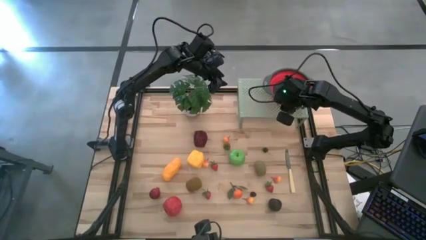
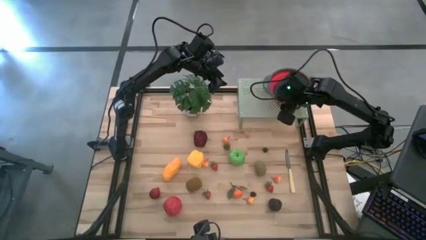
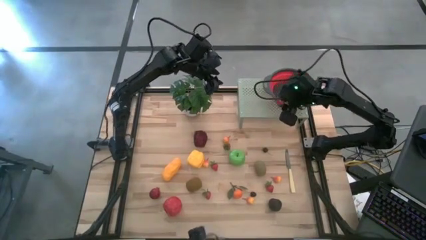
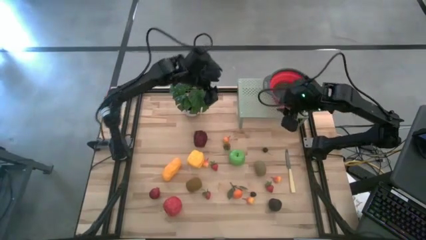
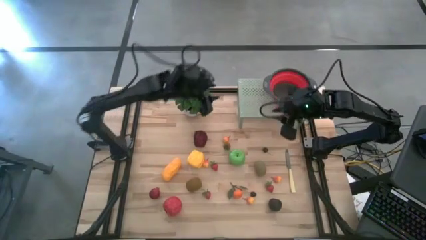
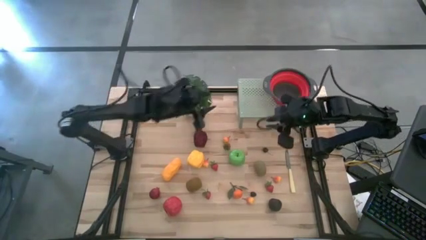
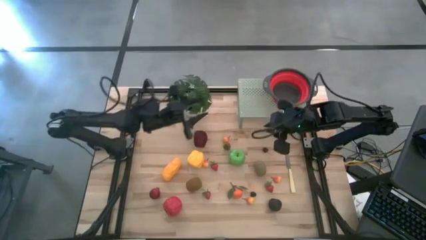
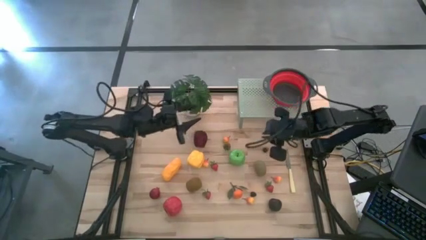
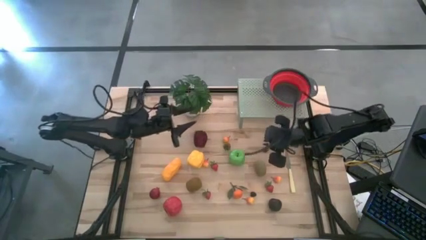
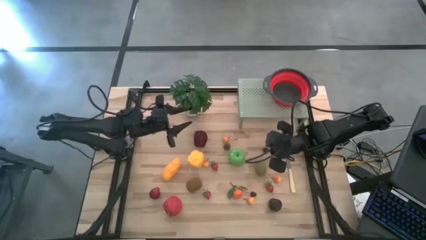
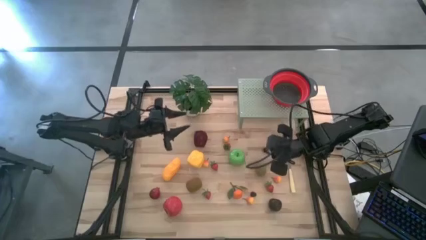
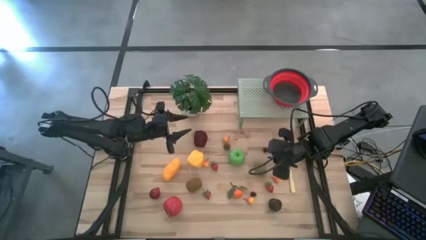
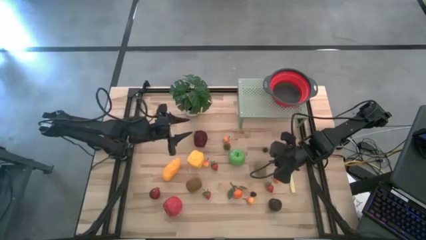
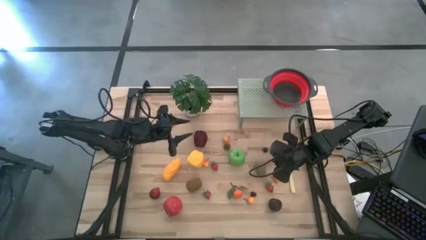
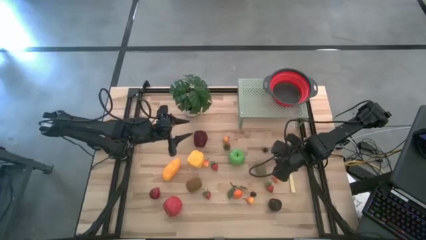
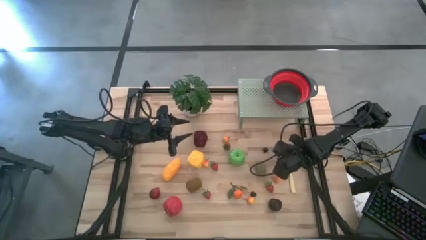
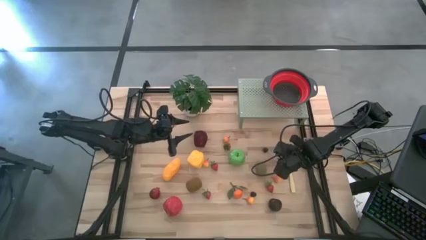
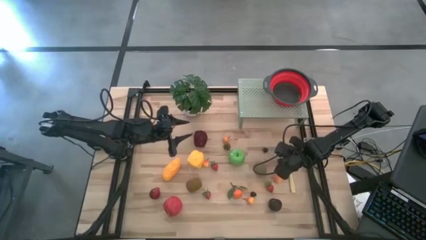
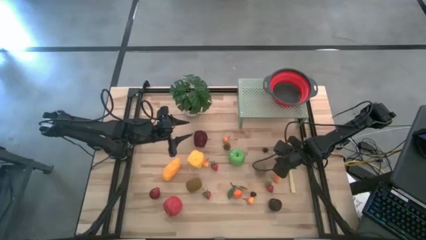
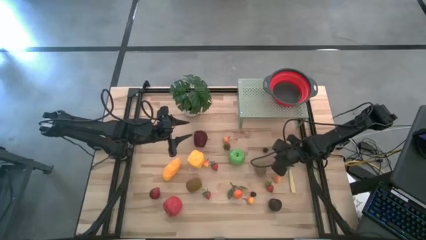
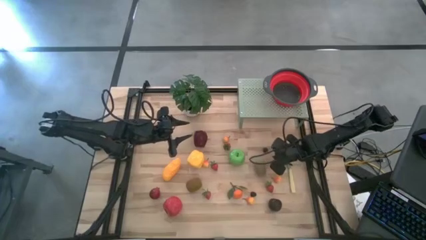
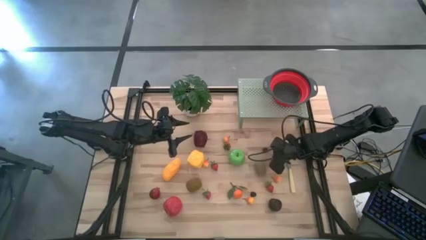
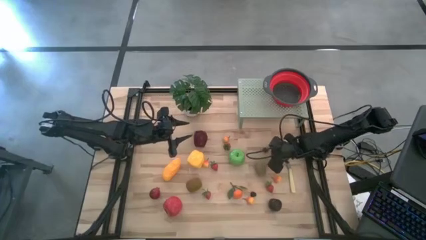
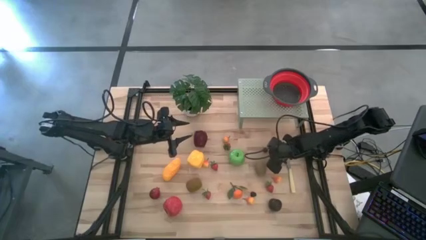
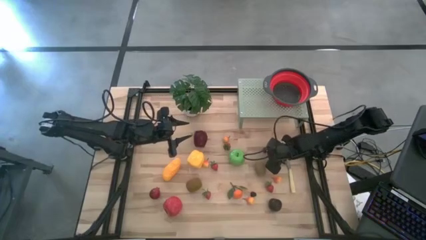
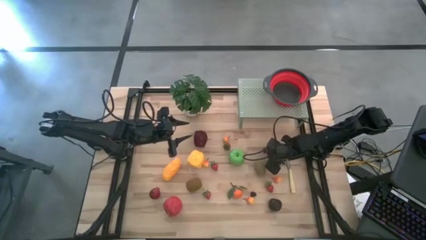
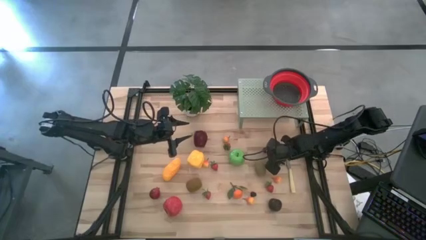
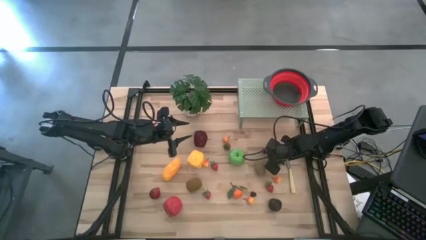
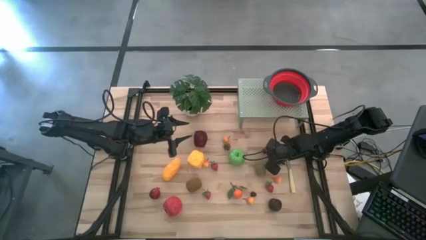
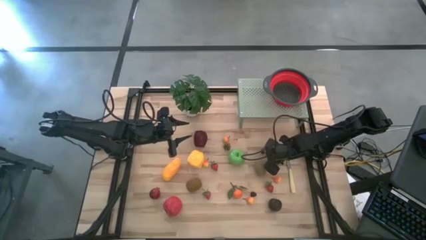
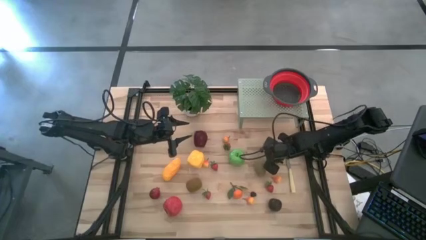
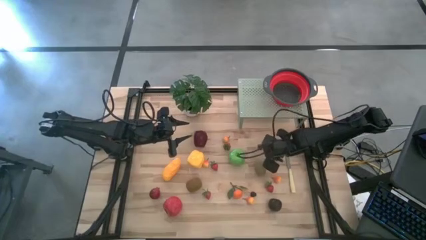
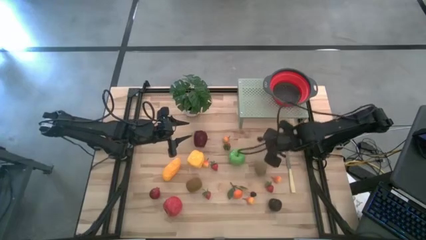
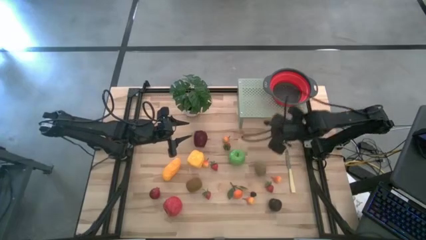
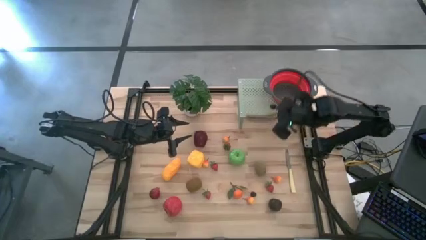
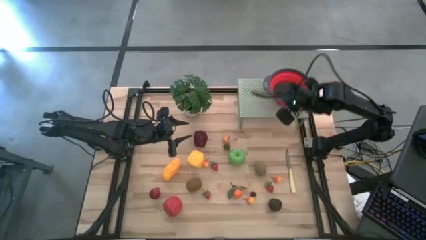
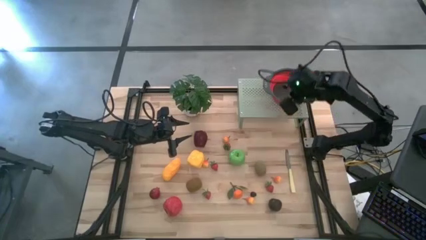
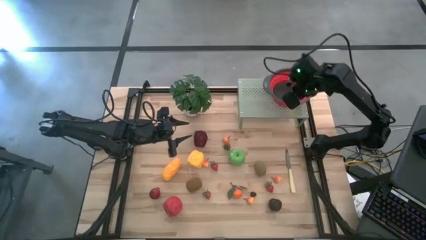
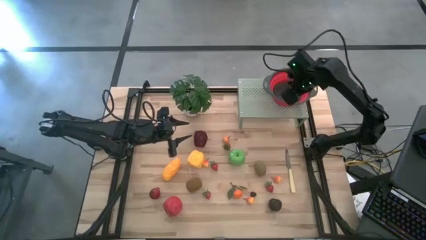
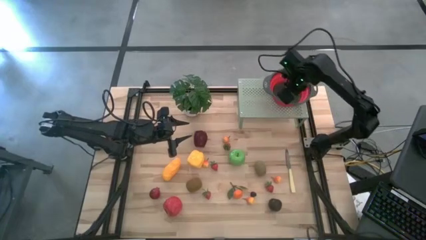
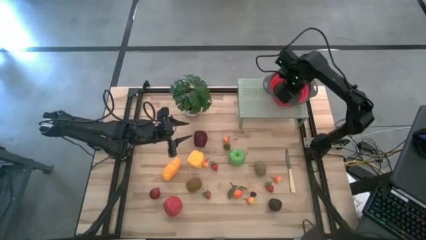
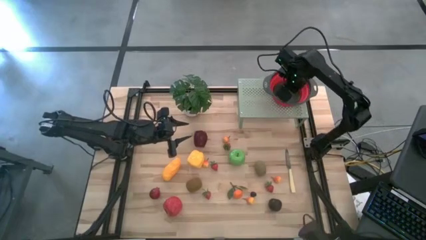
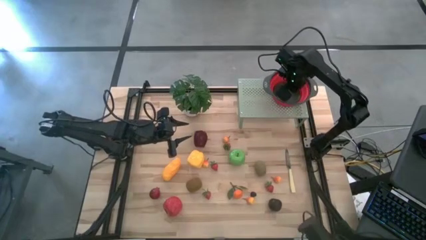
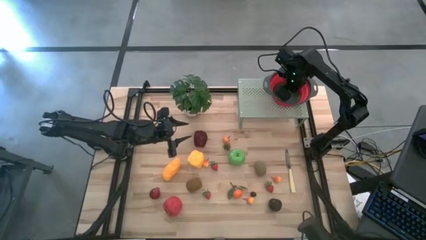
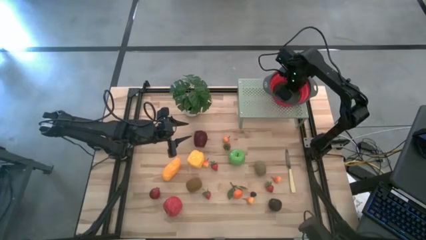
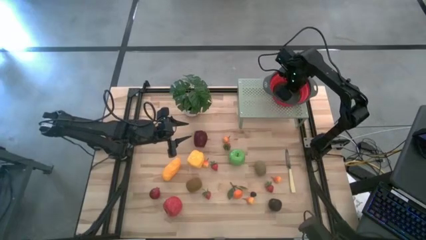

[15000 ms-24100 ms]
Task: Pick & Place Fruit
Put the red cherry into the red strainer bowl on the shelf

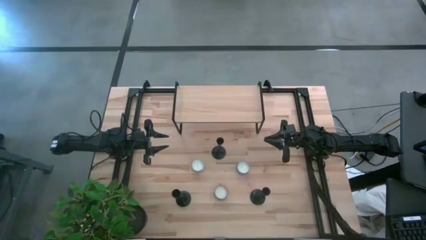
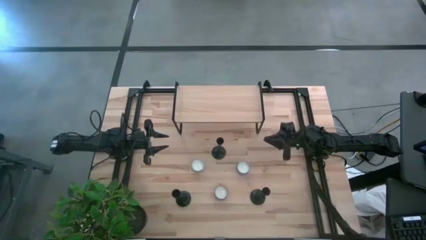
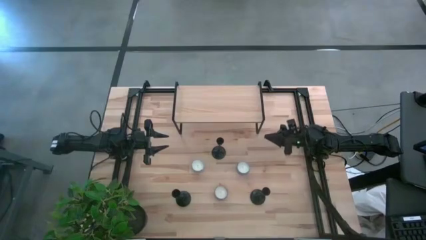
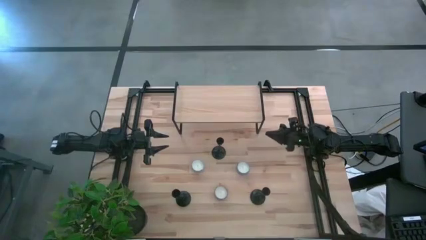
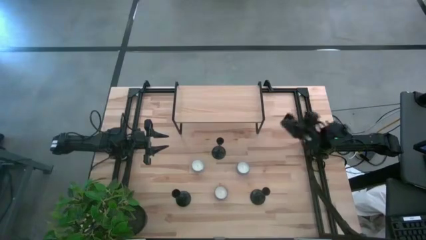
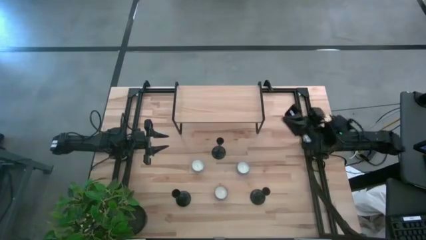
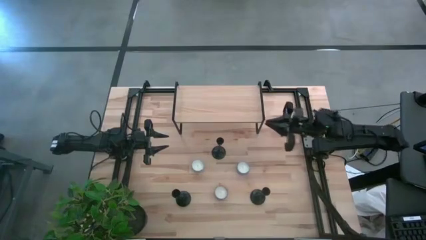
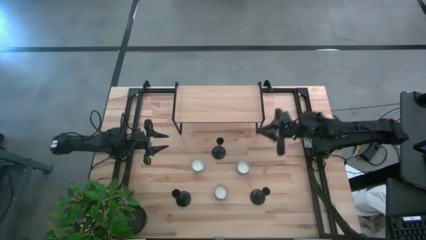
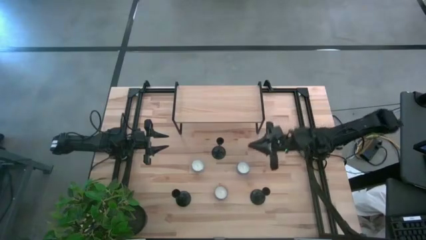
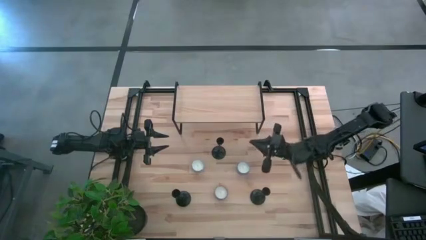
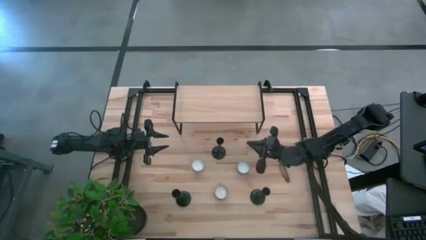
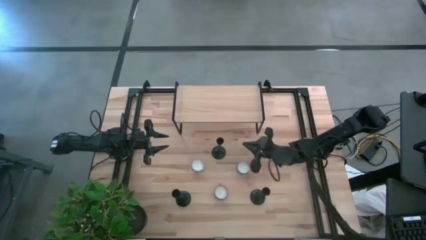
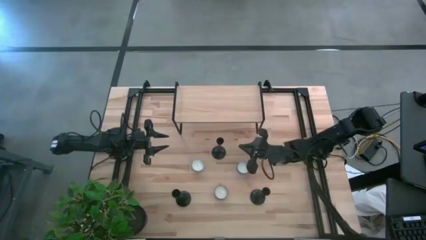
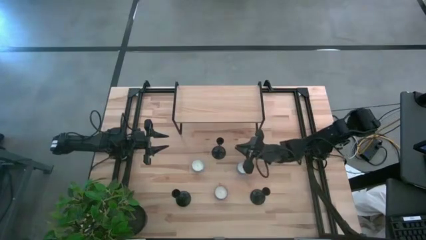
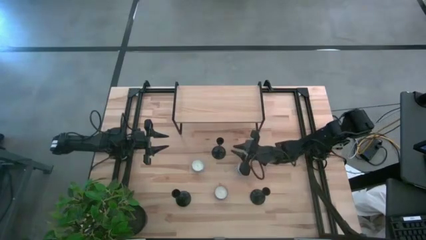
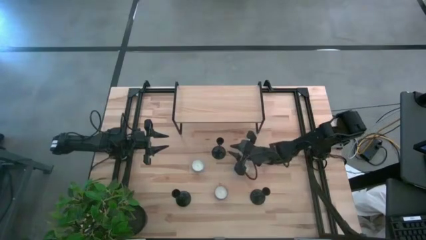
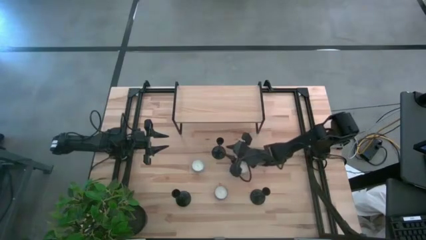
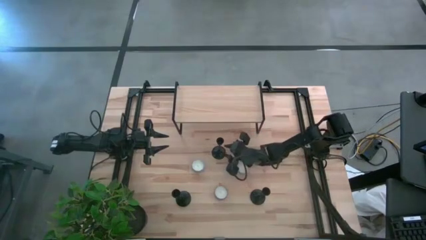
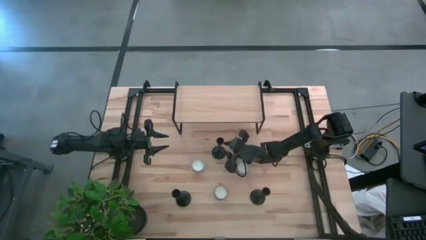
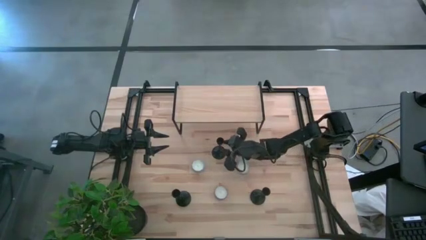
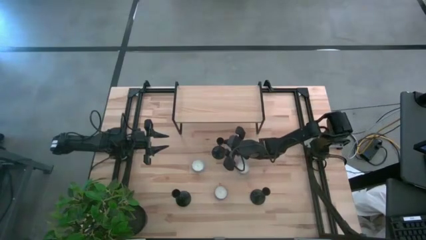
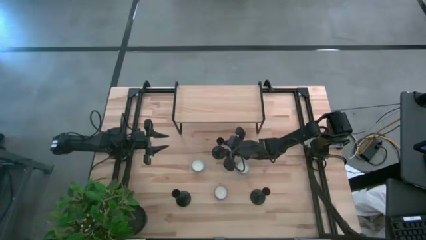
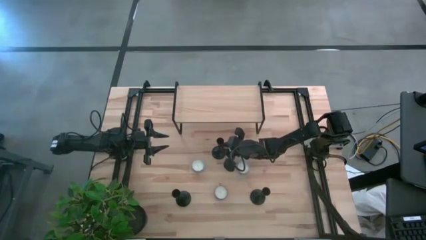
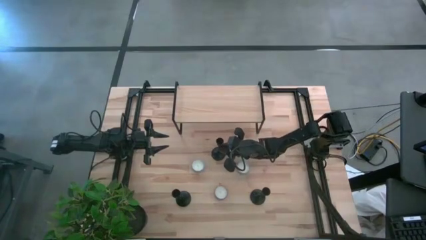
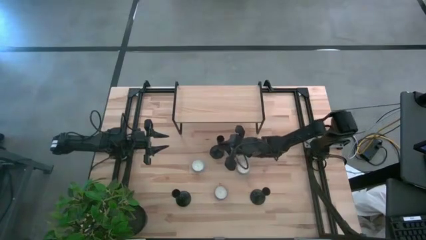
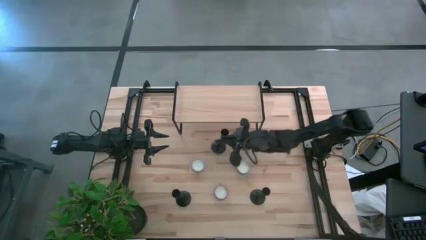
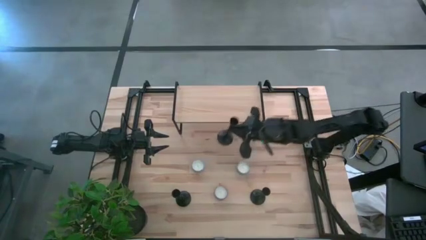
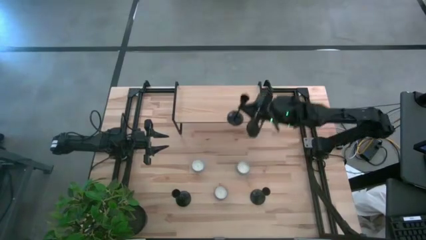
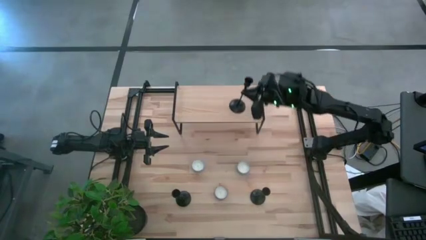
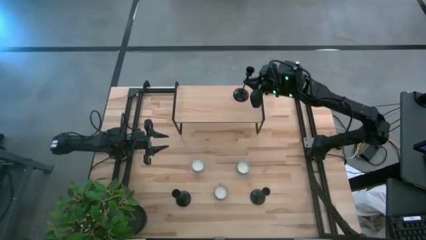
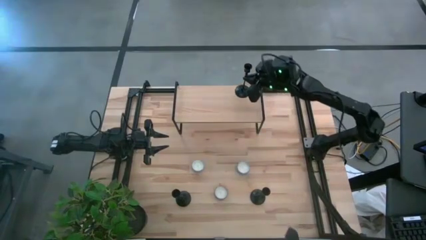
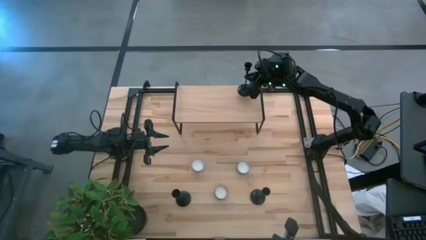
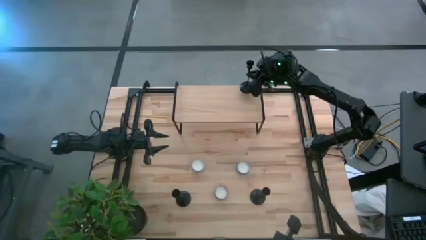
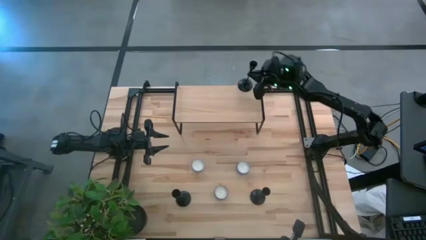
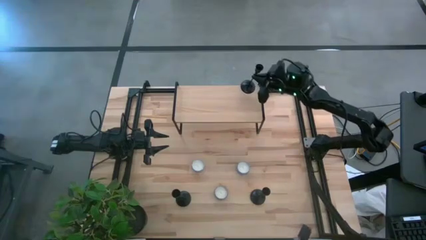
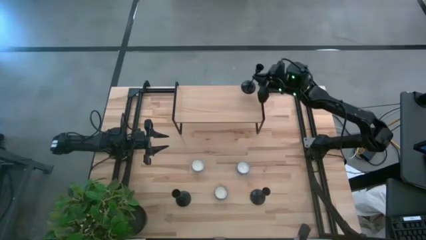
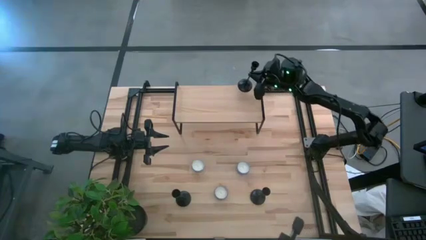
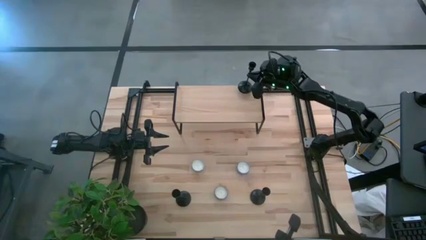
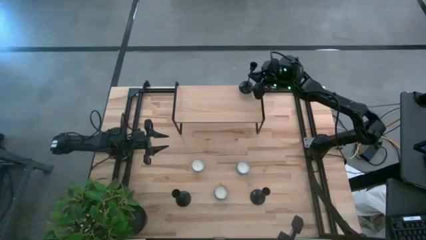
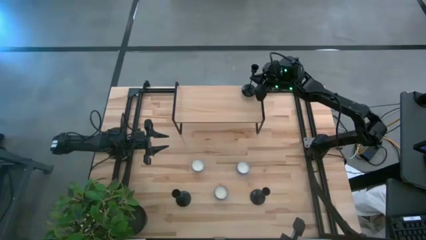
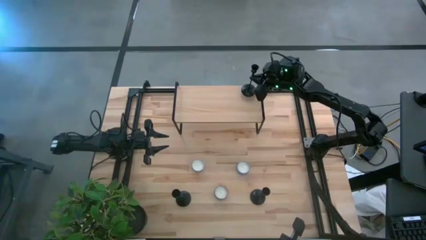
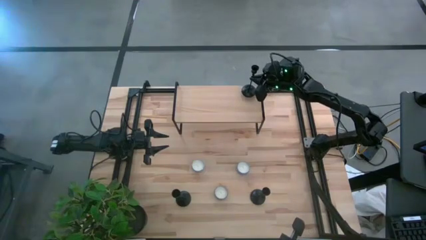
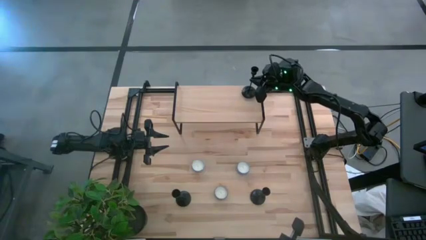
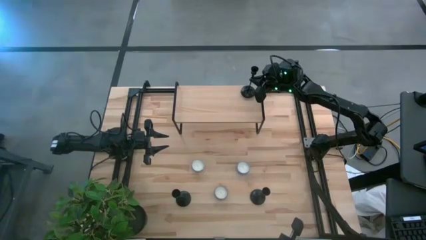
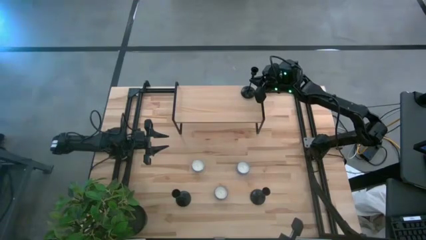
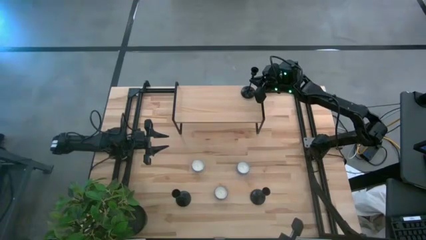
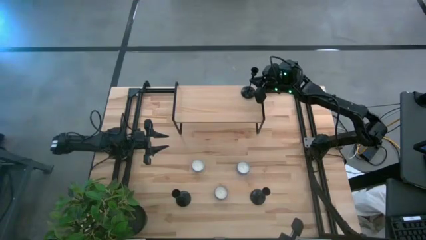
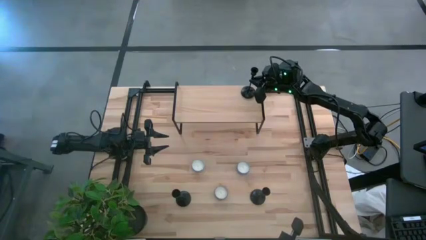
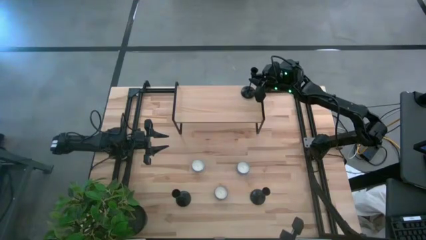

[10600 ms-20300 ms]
Task: Pick & Place candle stick holders
Put the top black candle holder on the shelf
